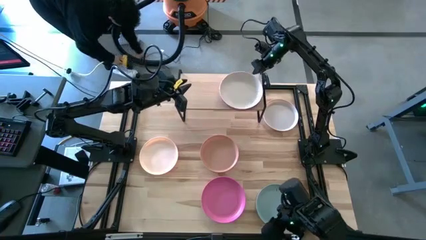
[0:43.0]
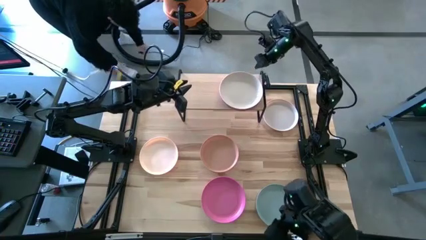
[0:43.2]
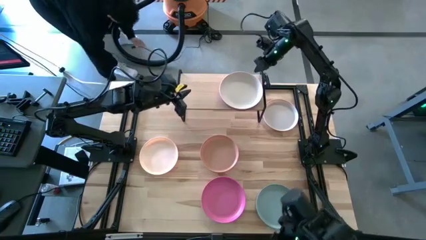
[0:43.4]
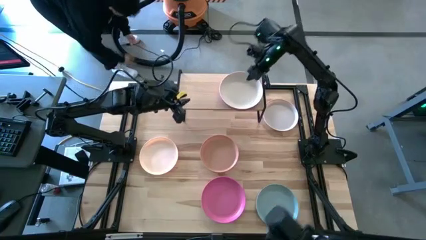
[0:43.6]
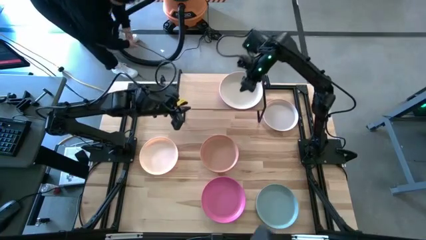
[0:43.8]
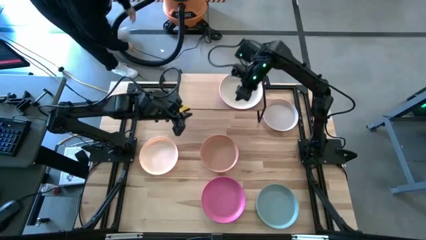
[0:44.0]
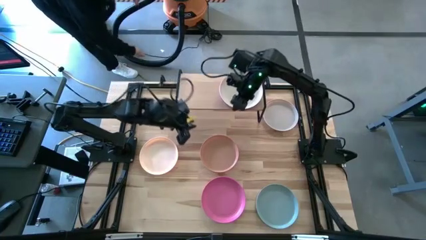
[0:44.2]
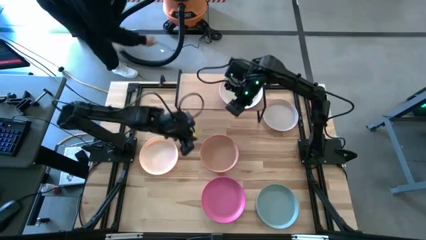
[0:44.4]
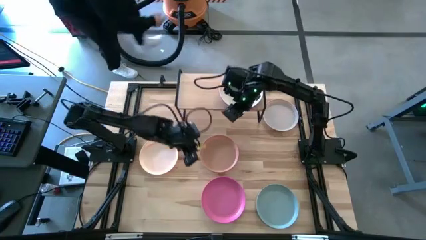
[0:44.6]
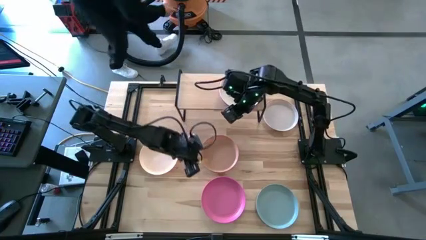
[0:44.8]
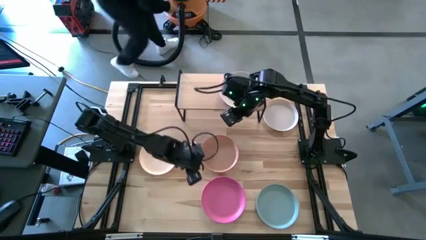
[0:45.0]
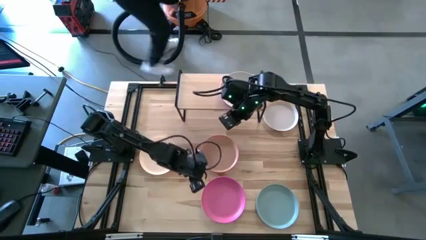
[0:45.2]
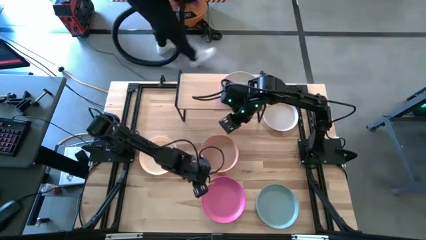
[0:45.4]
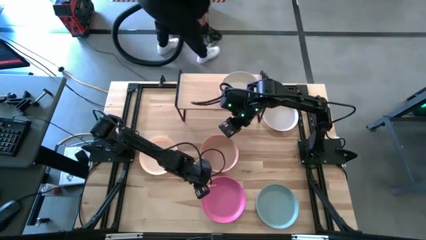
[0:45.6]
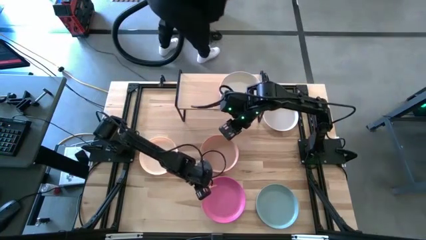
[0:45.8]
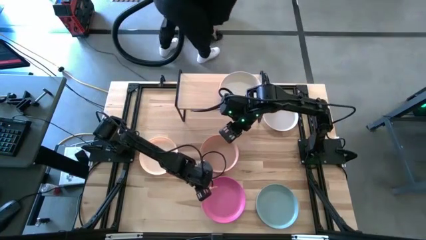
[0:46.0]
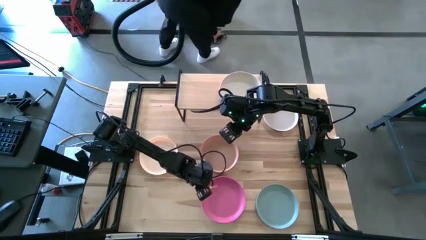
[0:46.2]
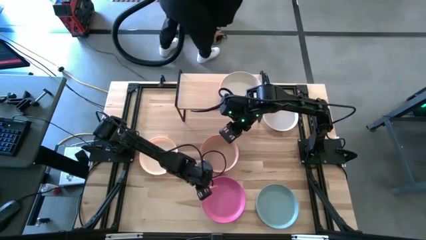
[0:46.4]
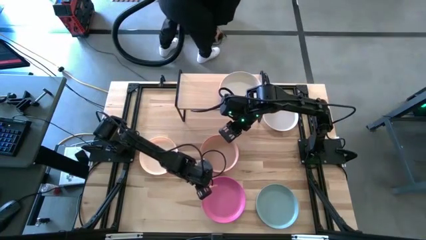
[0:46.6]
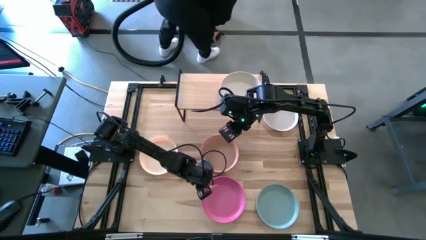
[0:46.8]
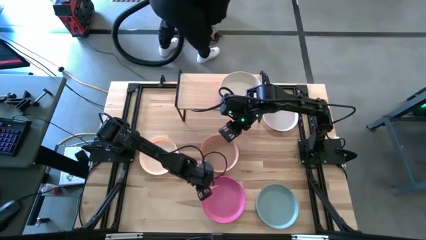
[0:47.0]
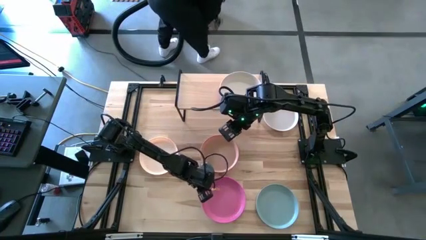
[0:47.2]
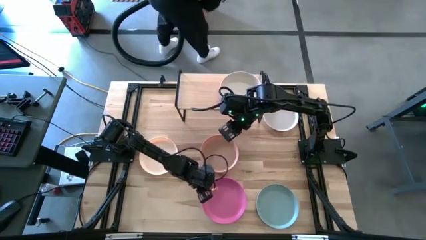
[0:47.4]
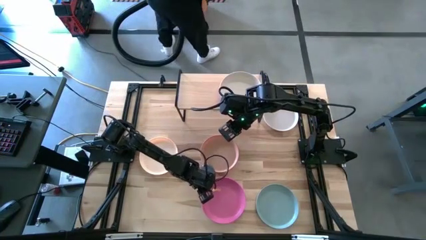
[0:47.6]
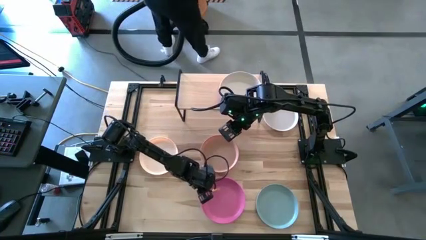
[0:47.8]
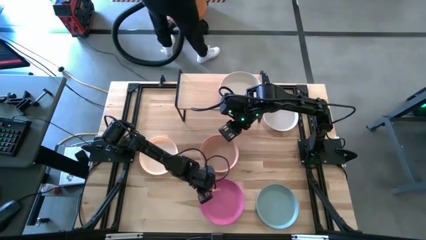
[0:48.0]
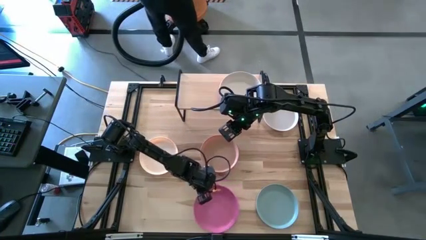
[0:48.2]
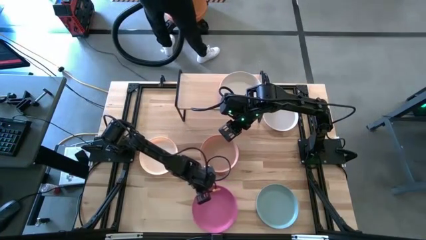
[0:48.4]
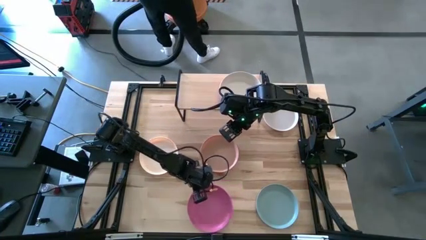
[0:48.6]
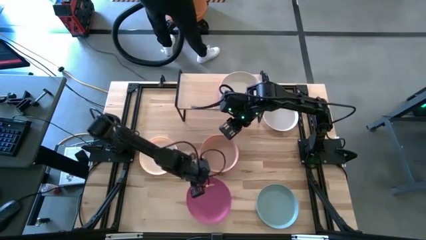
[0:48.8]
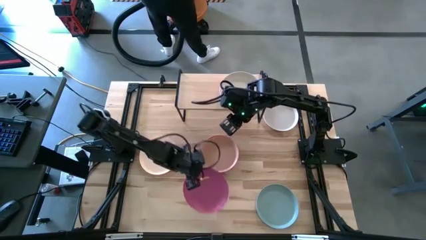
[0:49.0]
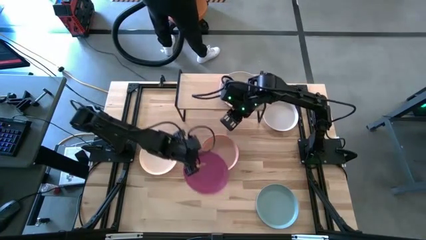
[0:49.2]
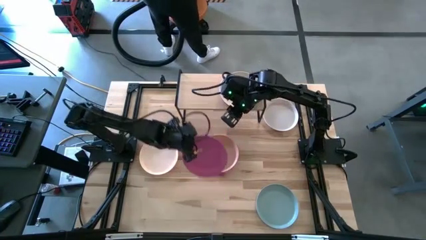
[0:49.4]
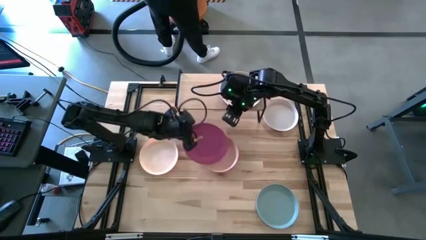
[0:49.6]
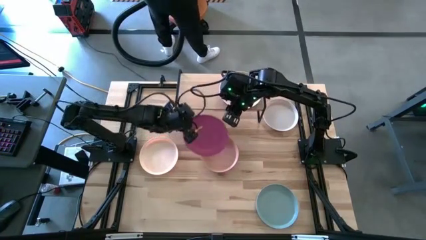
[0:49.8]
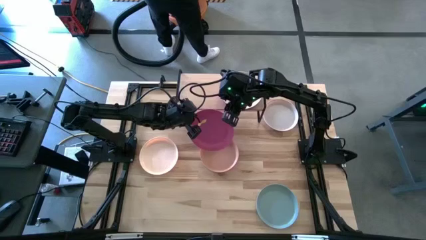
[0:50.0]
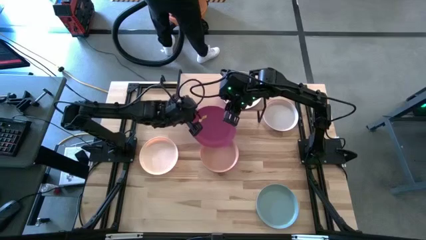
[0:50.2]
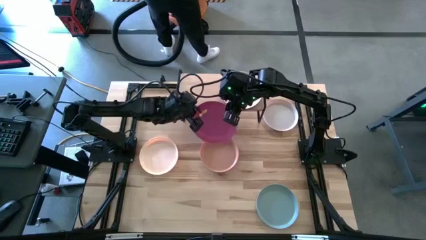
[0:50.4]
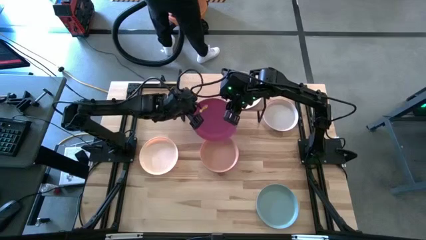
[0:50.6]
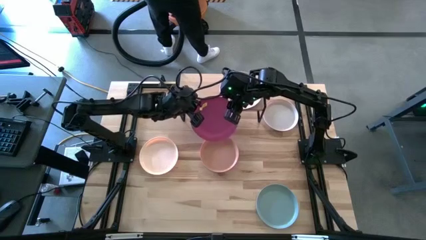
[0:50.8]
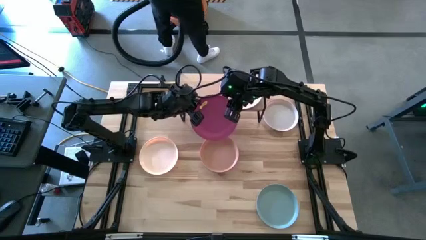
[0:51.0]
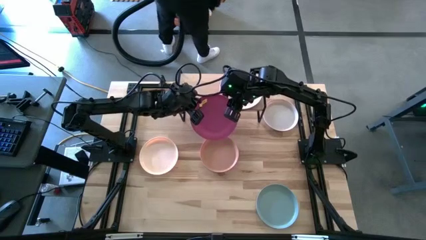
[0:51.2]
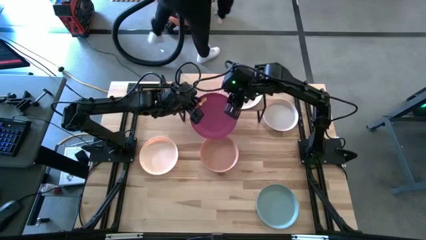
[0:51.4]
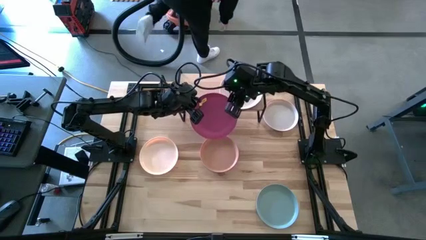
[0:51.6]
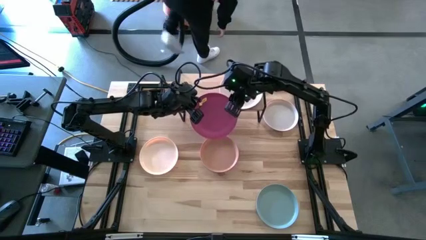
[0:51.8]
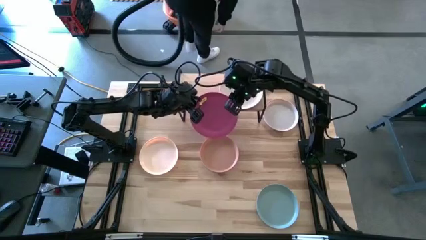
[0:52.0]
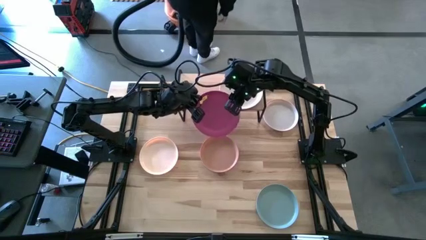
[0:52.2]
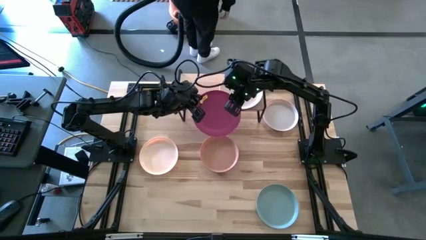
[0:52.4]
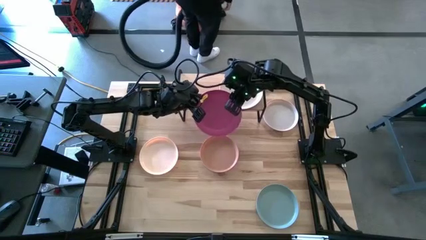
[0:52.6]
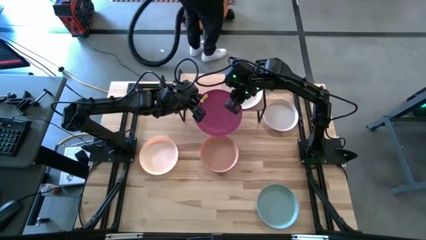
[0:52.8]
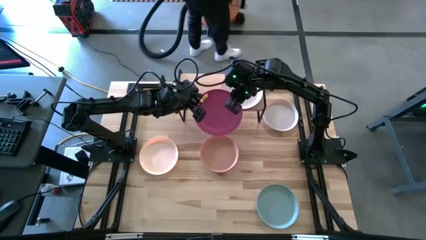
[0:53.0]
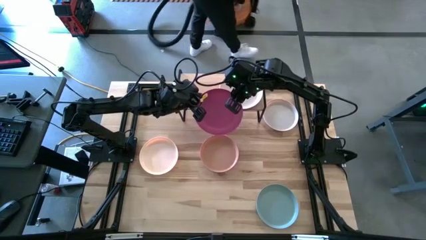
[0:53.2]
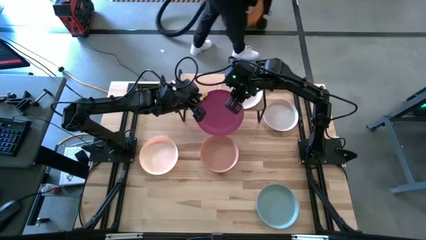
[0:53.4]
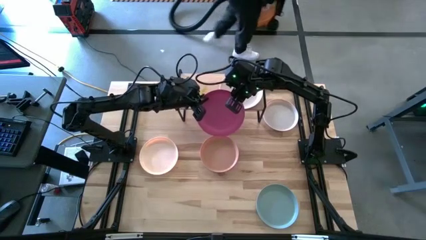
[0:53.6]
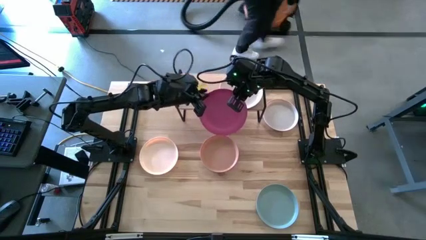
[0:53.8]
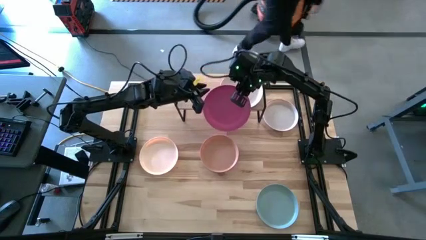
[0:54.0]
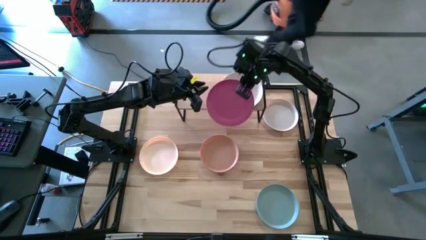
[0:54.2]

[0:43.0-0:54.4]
Task: Place and stack plates onto a shelf
Stack the pink plate on top of the gray plate

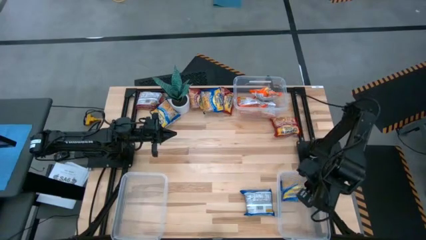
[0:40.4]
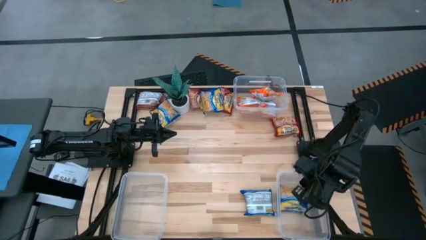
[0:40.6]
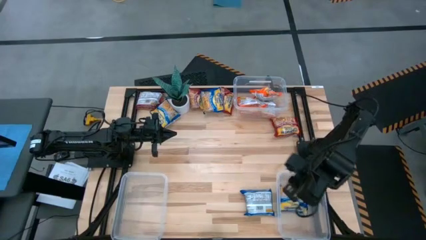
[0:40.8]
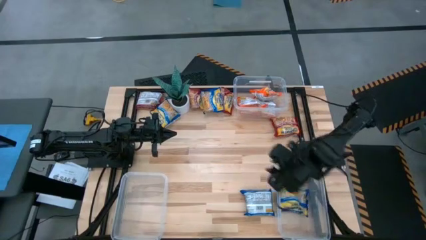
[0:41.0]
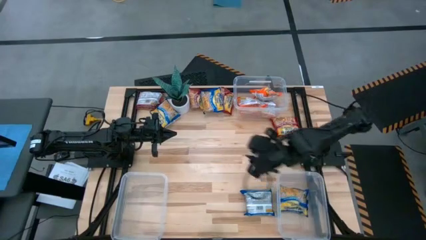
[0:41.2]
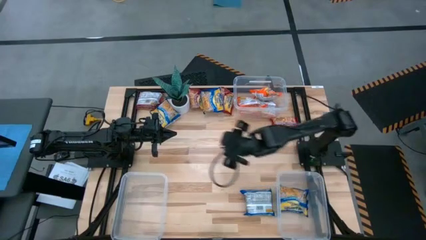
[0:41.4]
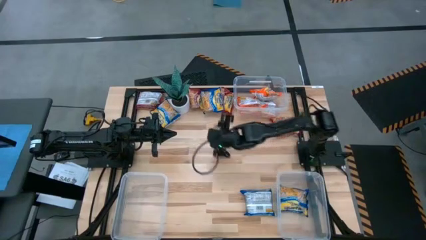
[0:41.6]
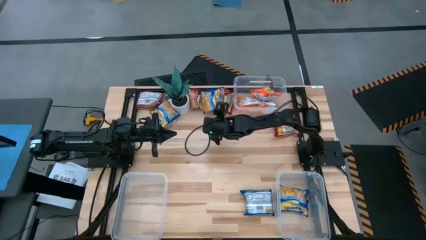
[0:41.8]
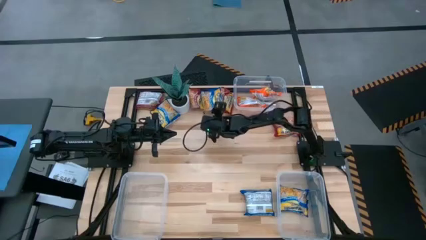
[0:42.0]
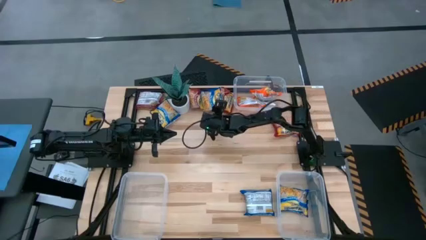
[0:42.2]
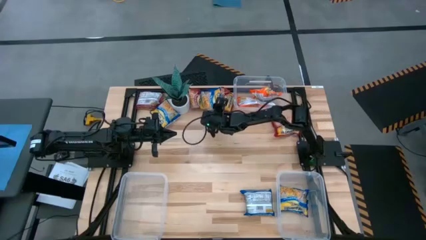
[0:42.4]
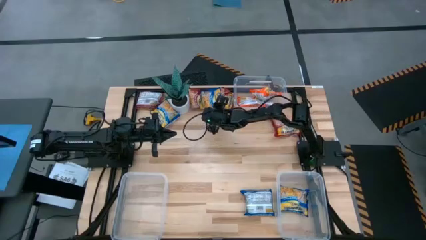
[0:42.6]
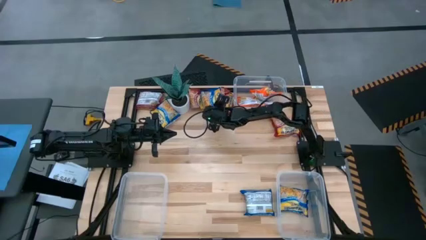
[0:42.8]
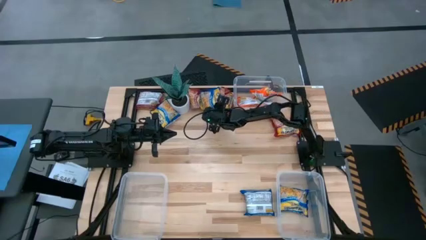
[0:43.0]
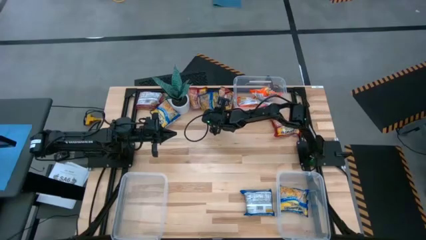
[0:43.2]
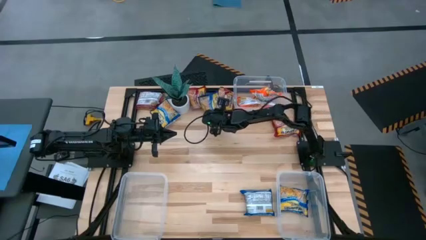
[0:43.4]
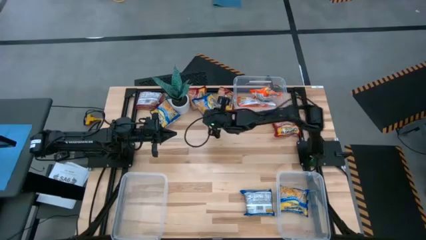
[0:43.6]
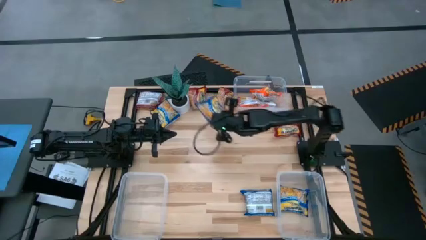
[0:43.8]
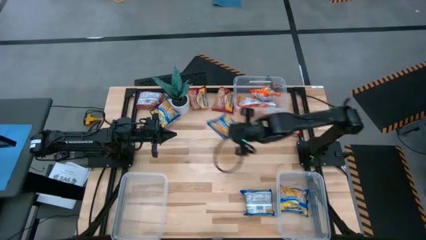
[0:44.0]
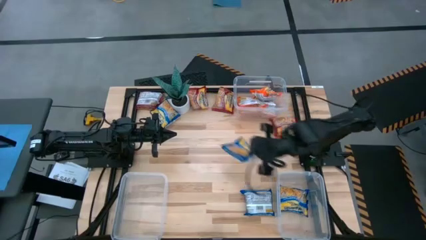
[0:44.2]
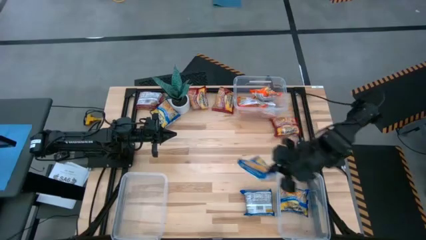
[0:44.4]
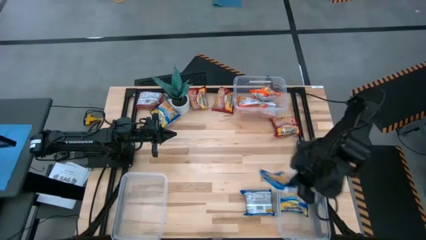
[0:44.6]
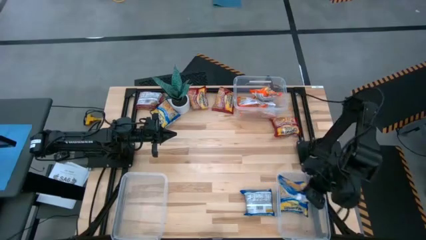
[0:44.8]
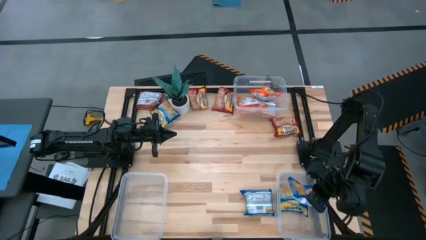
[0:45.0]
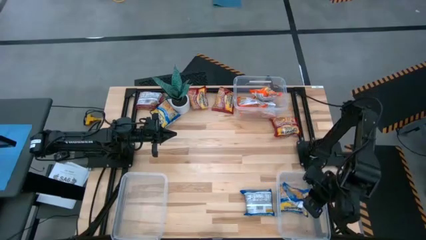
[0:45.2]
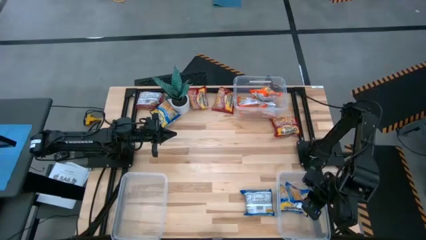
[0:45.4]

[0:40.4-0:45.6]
Task: Sort Maruchan noodles
Put the blue noodle pack into the bottom right transparent bin
